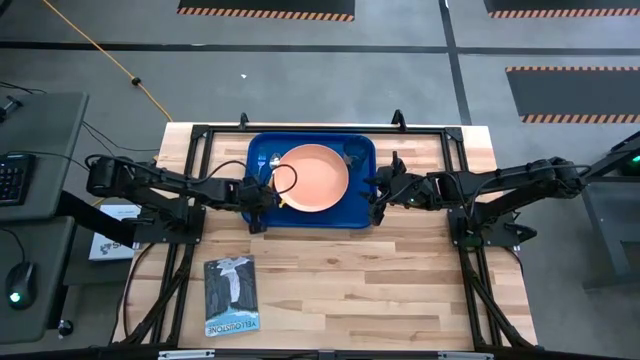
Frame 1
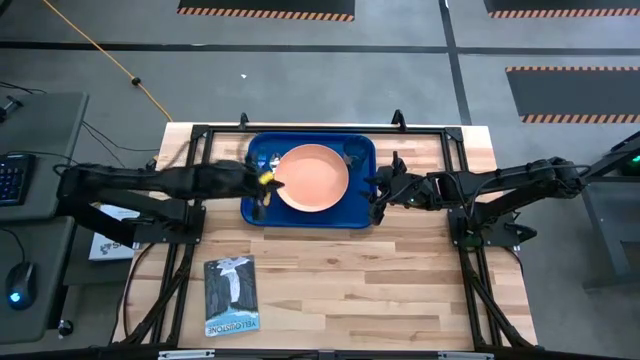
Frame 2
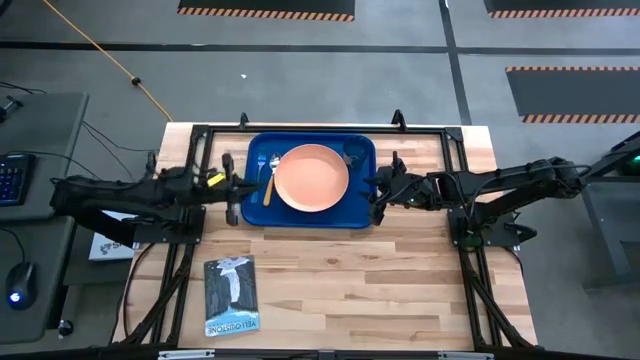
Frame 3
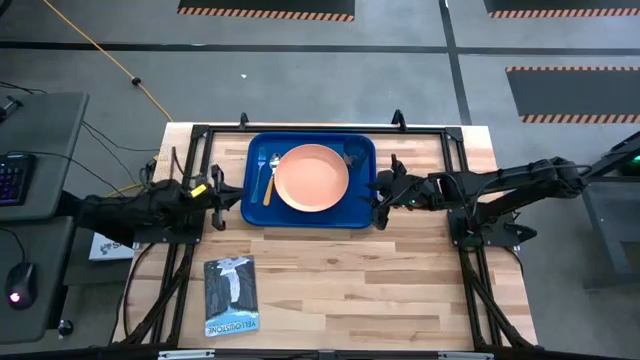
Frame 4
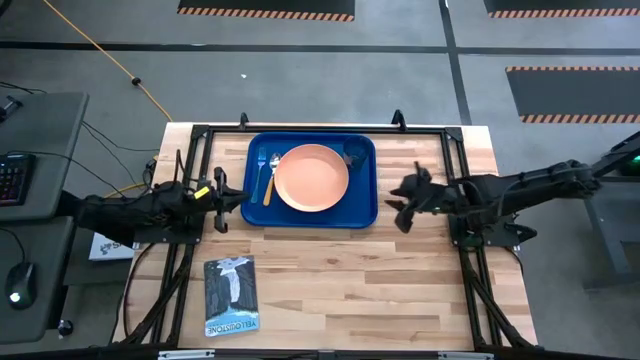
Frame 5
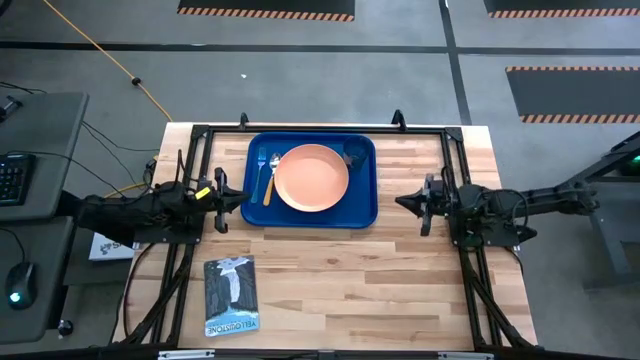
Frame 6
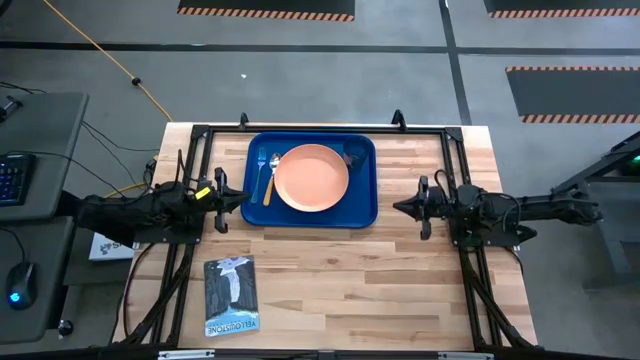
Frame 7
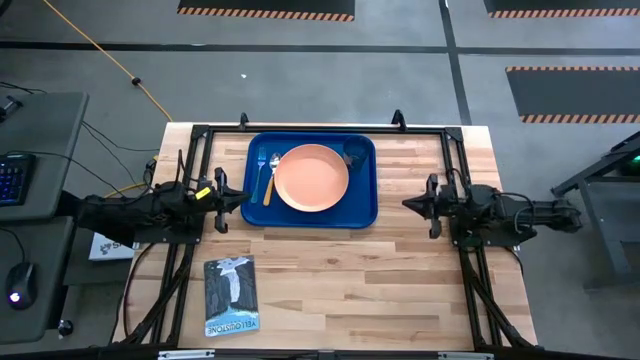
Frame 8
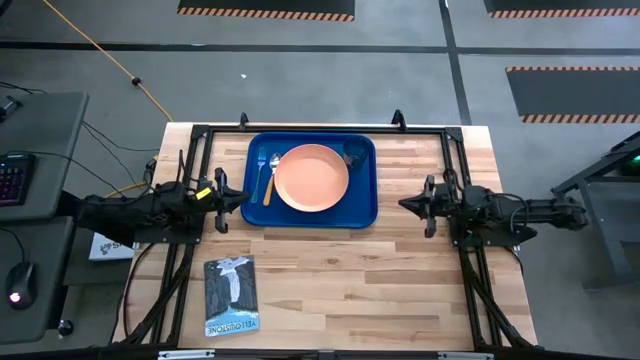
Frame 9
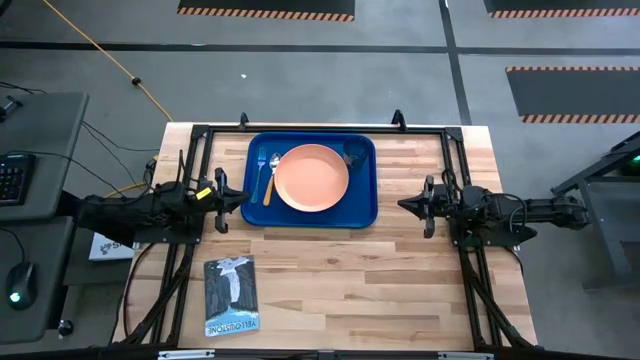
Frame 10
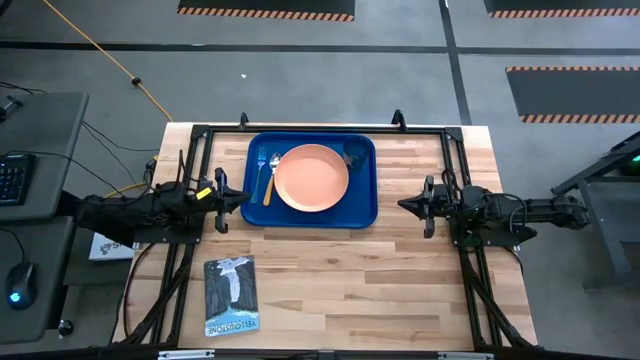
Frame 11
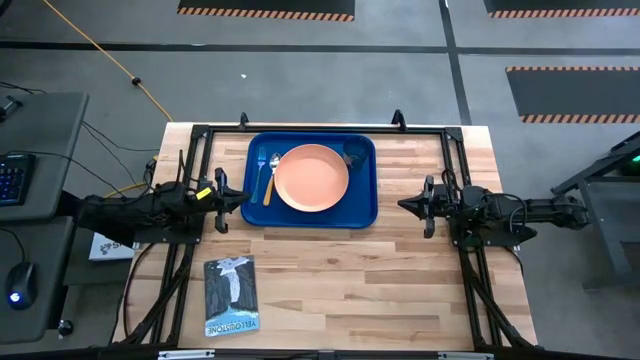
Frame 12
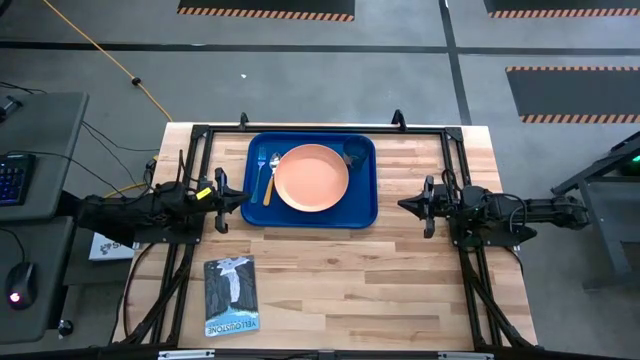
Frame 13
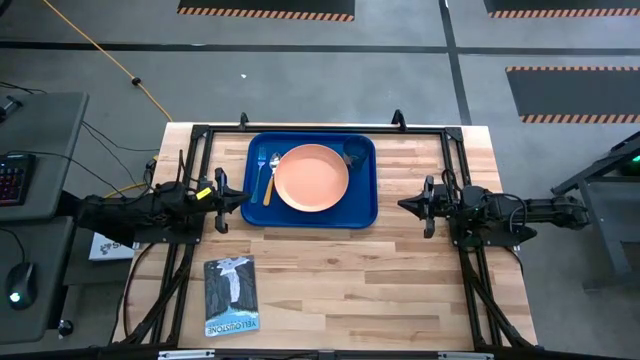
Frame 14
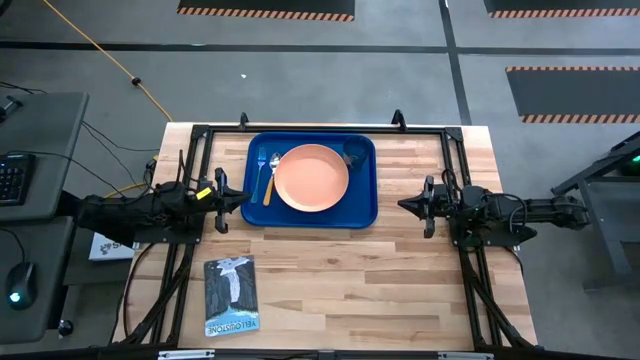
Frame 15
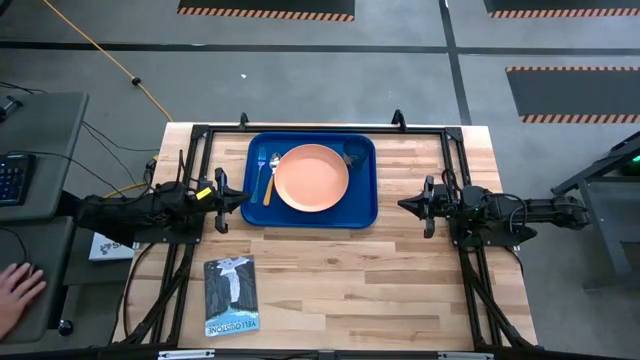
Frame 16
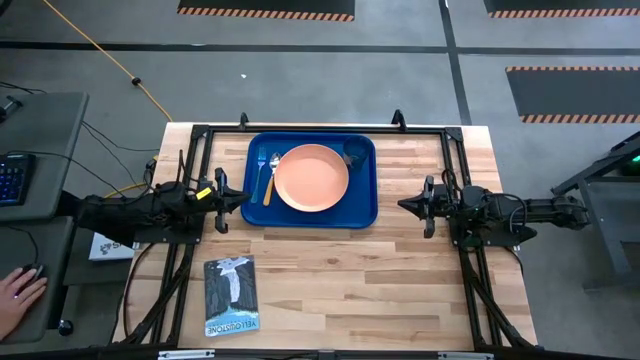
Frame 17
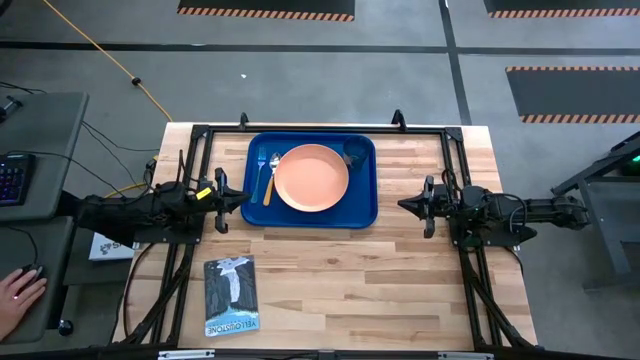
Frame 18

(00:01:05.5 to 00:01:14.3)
Task: Pick and place plate/cup/fork/spoon on tray
Return to Home Position

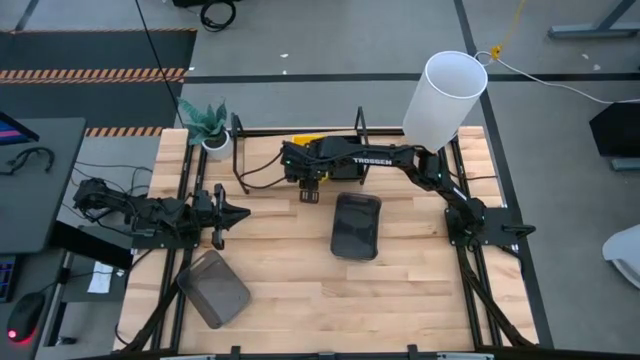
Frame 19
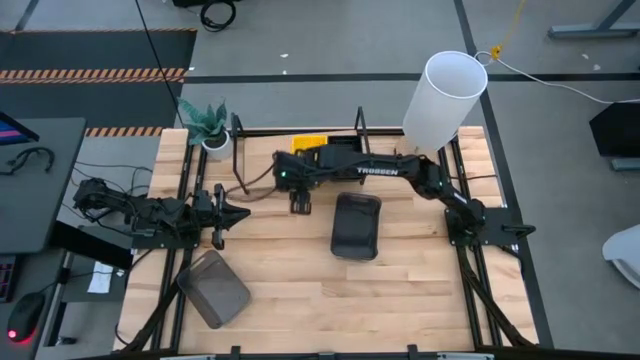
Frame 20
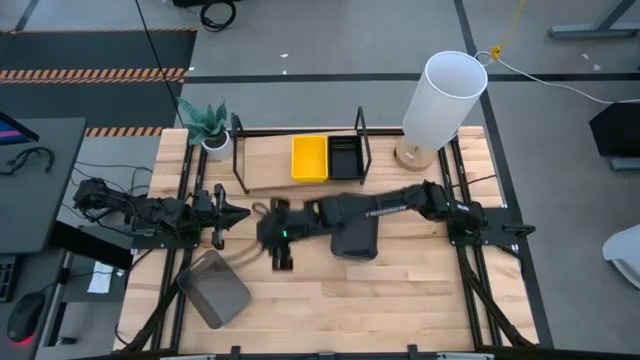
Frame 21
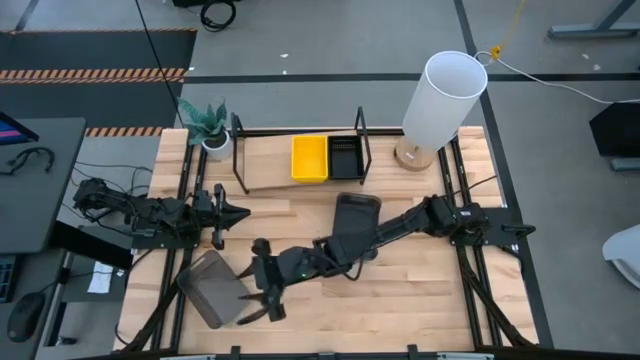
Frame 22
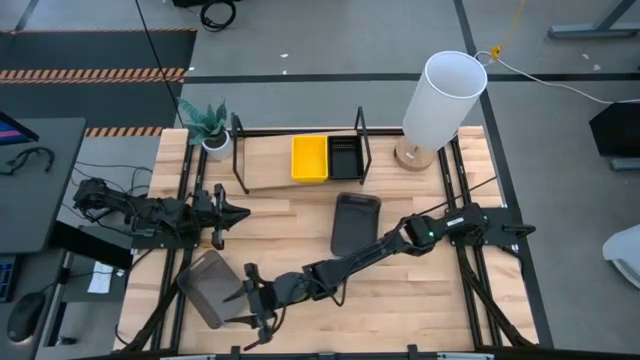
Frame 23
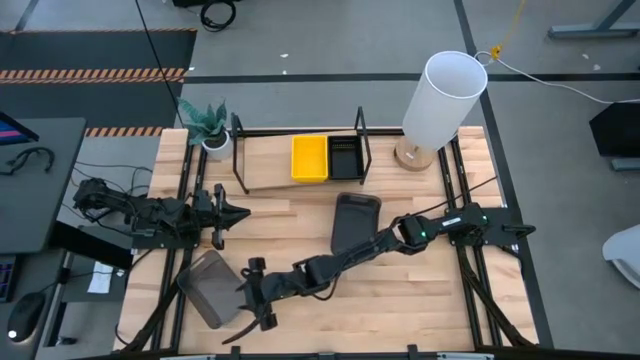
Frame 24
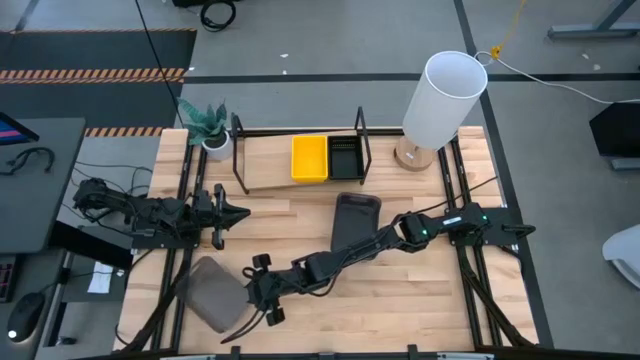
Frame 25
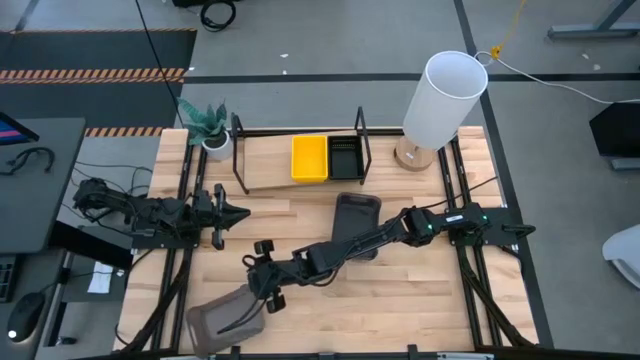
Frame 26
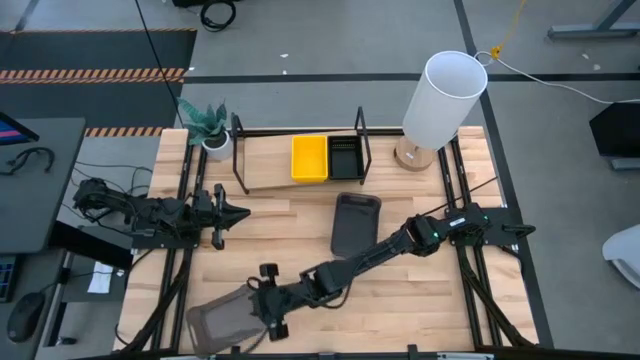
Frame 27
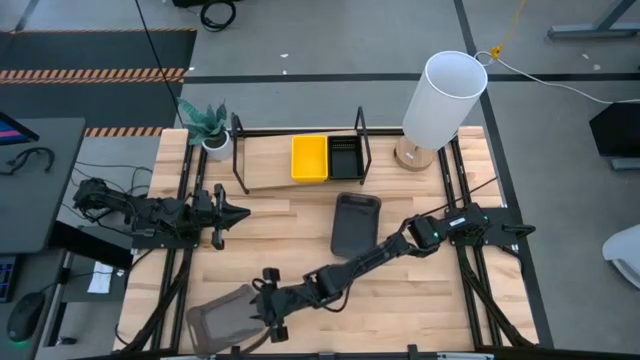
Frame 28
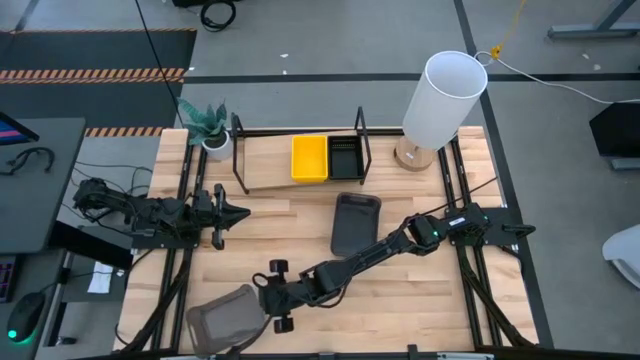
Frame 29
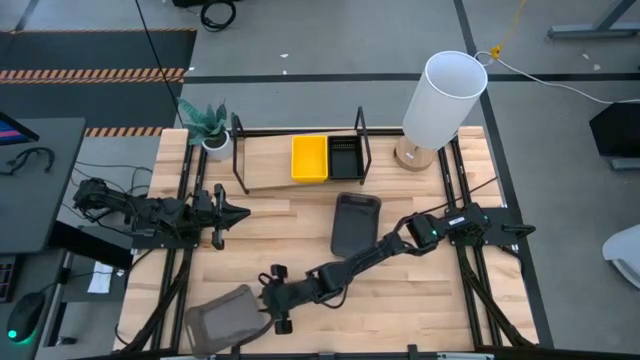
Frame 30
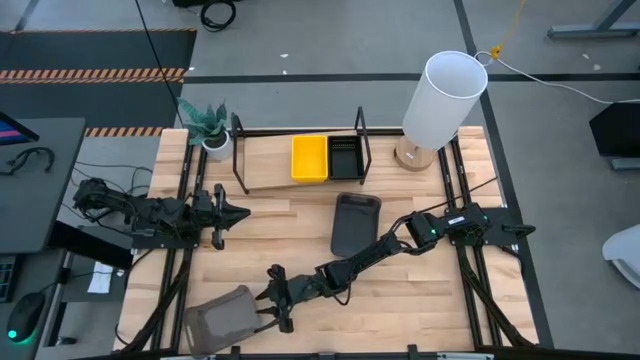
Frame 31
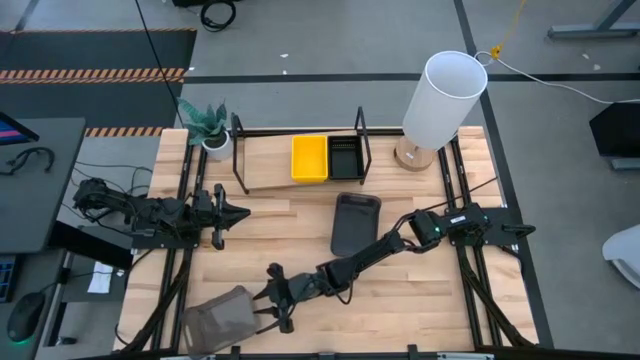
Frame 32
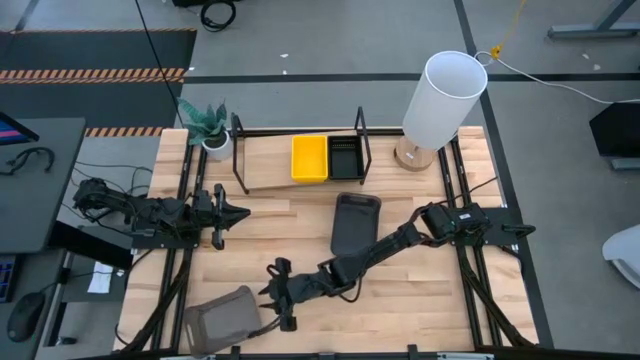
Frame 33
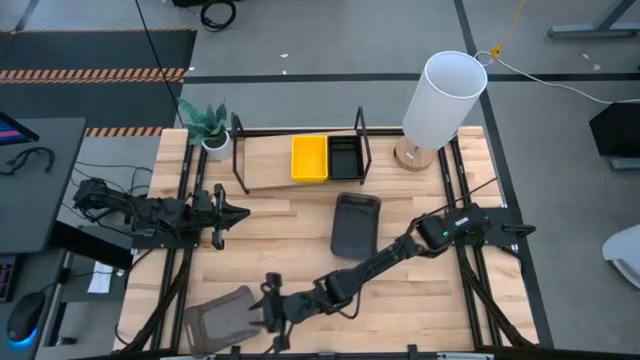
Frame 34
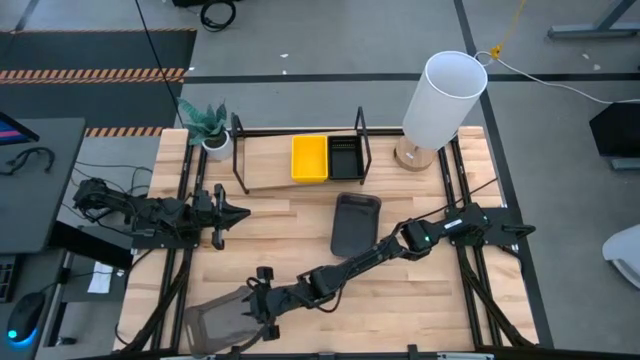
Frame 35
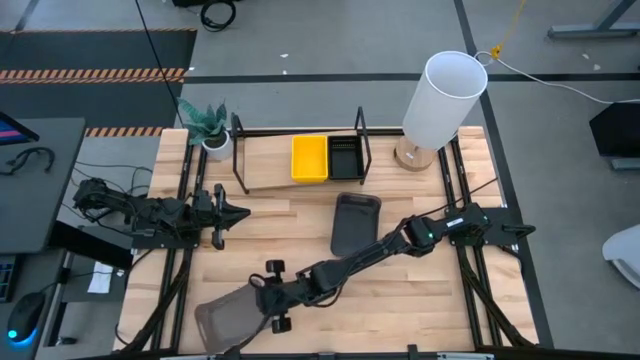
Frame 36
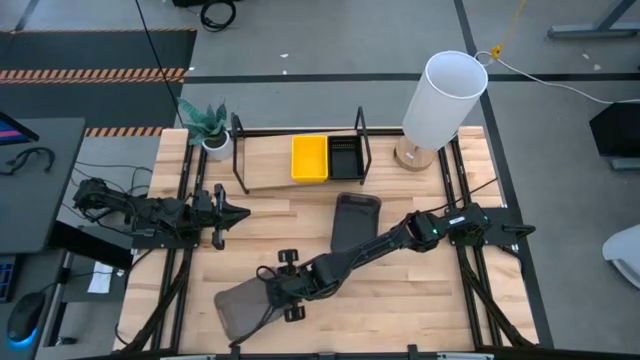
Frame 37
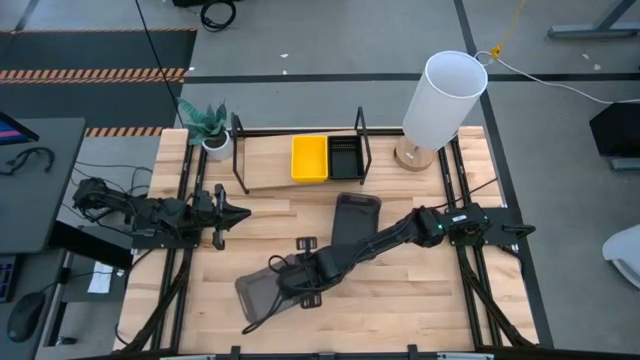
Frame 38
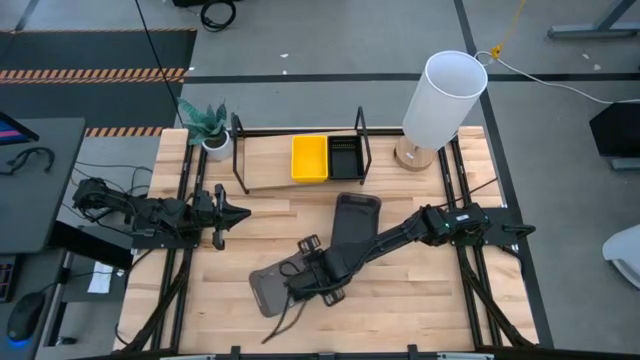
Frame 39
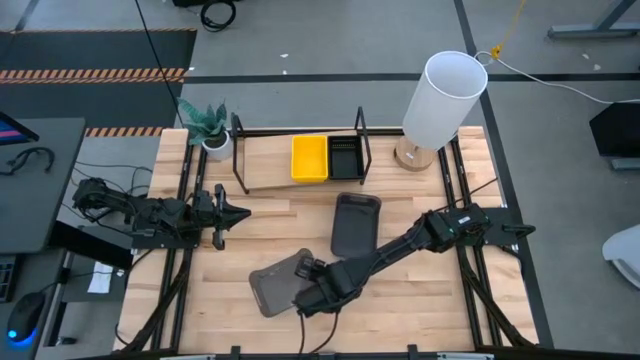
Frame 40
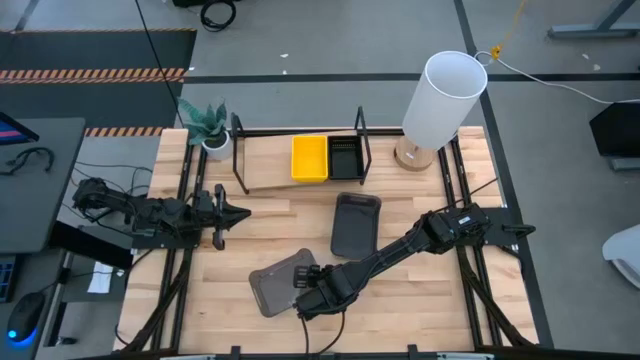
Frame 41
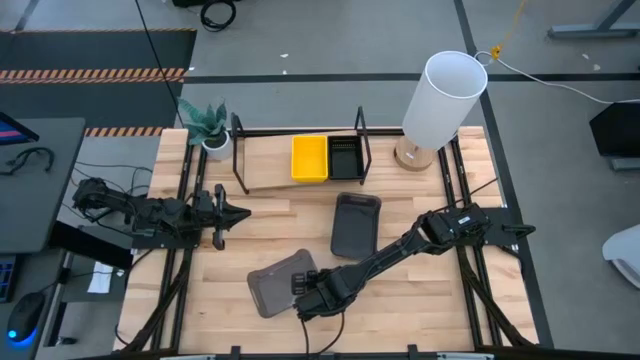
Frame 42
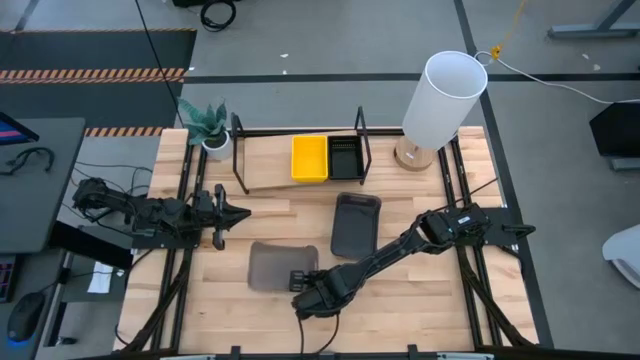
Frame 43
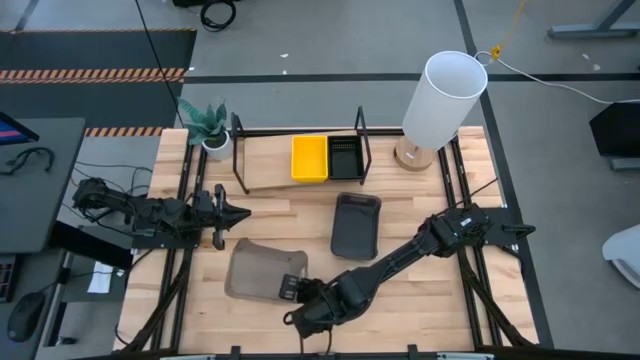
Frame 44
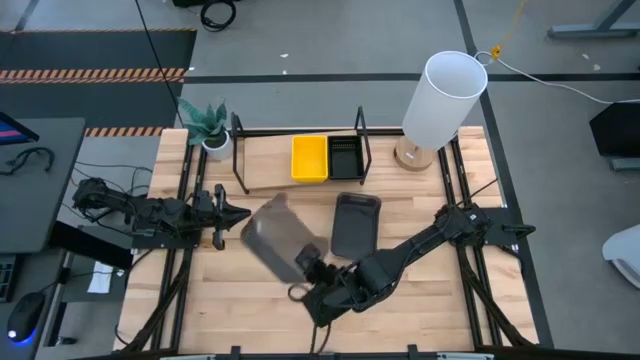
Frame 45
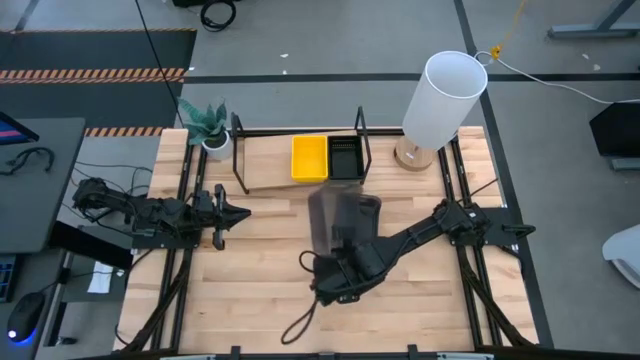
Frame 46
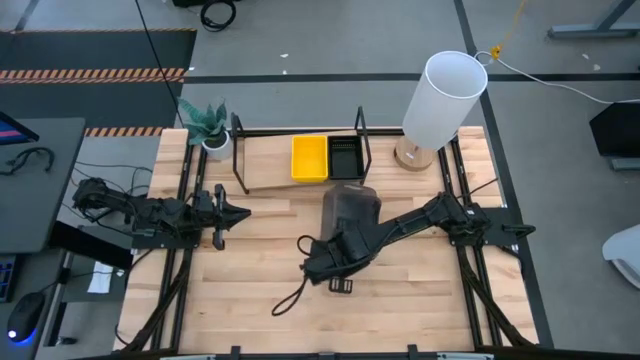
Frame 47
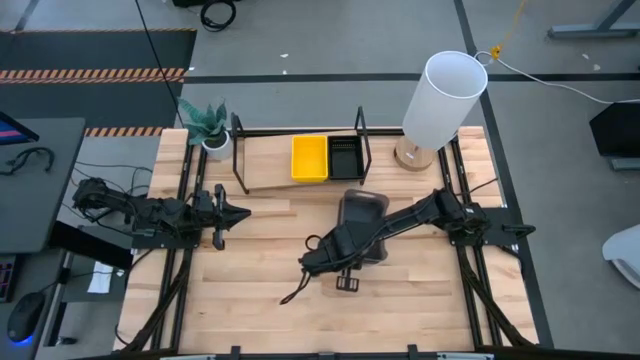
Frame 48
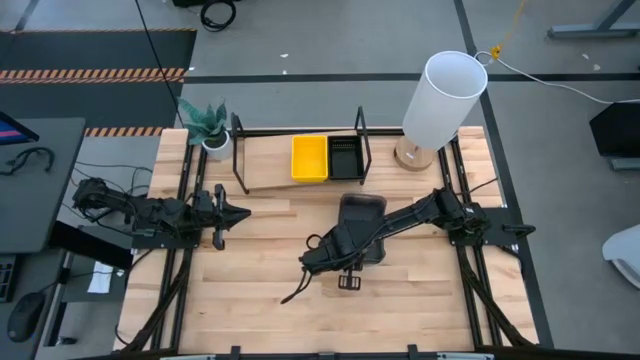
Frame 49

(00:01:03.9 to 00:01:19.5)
Task: Stack baskets on shelf by color
Stack the black transparent bin on the black transparent bin
